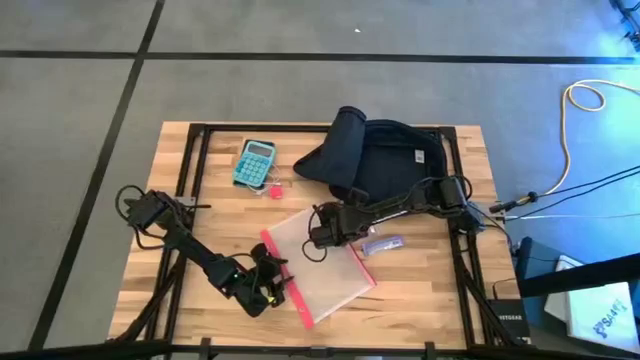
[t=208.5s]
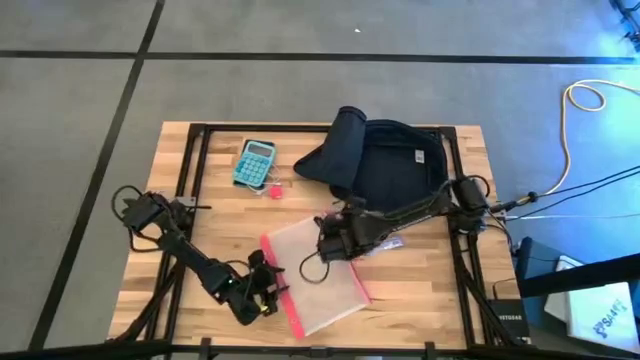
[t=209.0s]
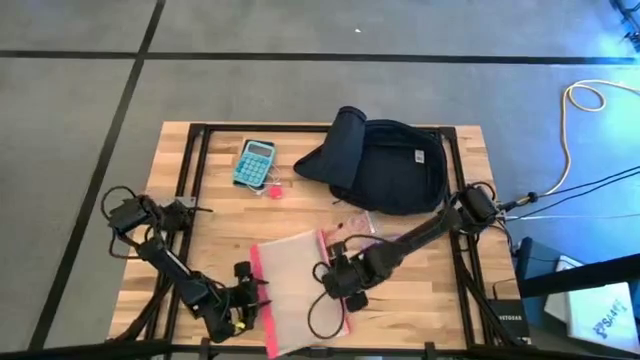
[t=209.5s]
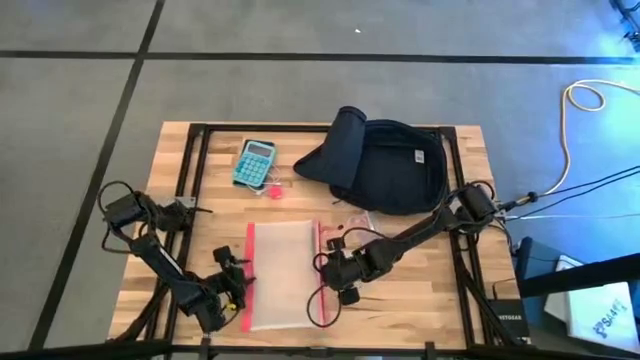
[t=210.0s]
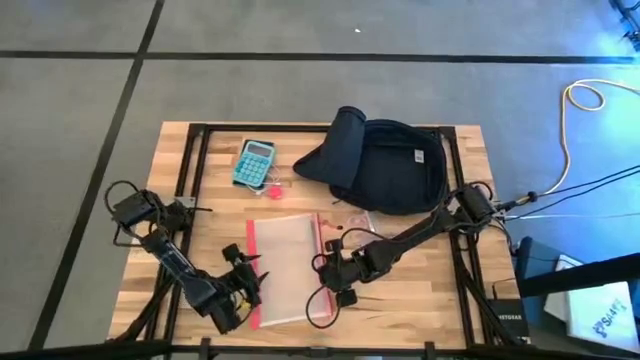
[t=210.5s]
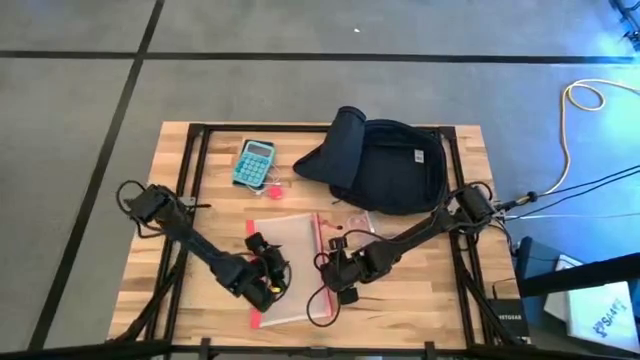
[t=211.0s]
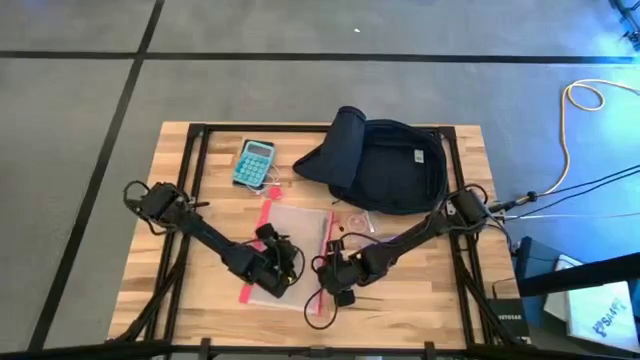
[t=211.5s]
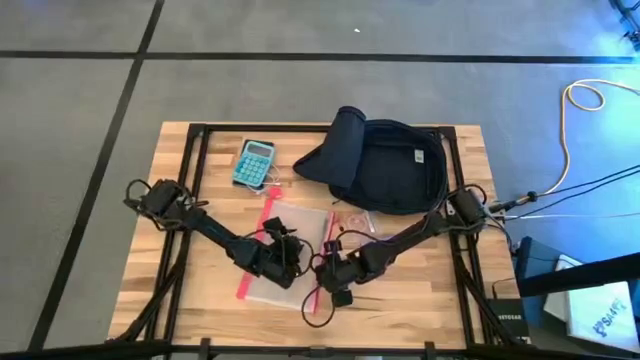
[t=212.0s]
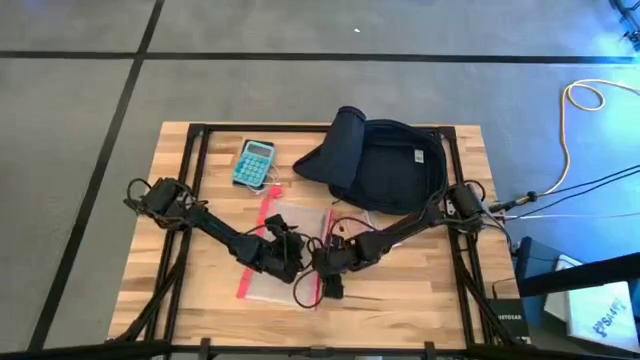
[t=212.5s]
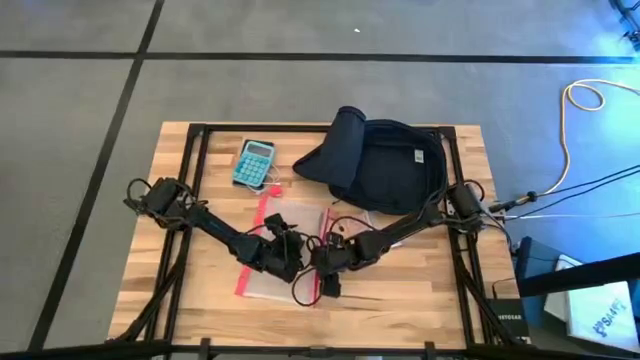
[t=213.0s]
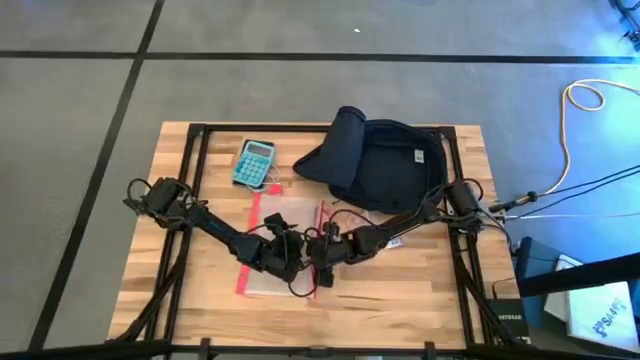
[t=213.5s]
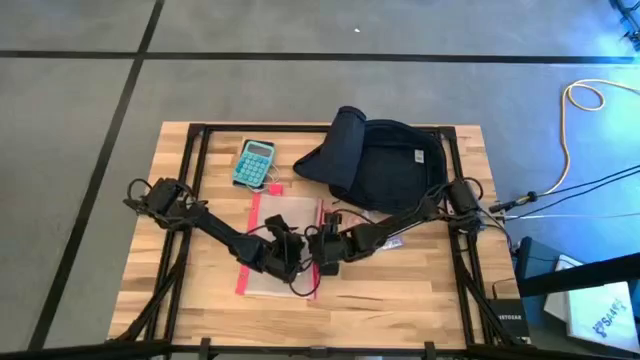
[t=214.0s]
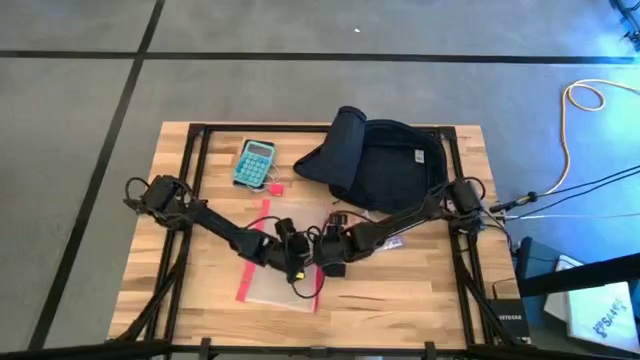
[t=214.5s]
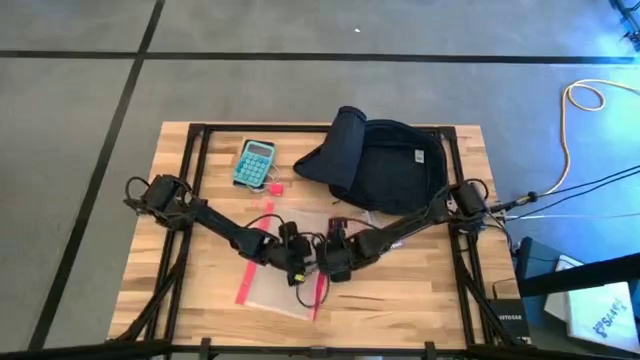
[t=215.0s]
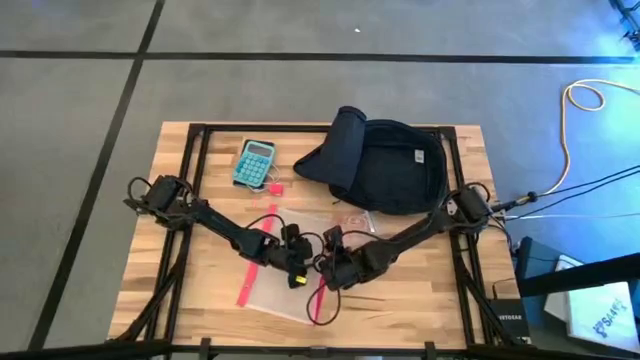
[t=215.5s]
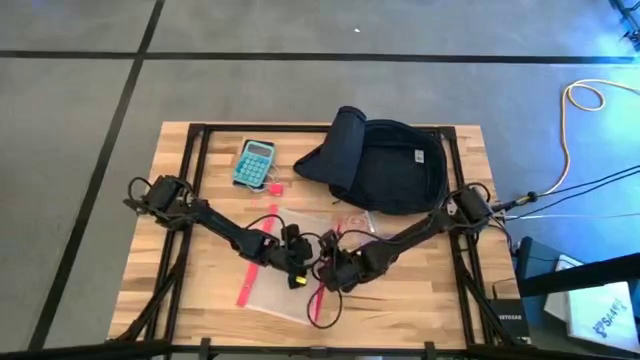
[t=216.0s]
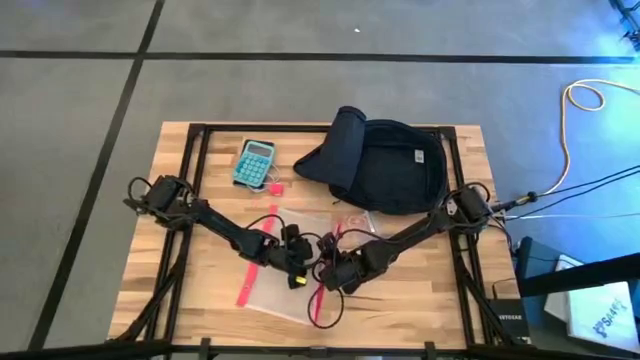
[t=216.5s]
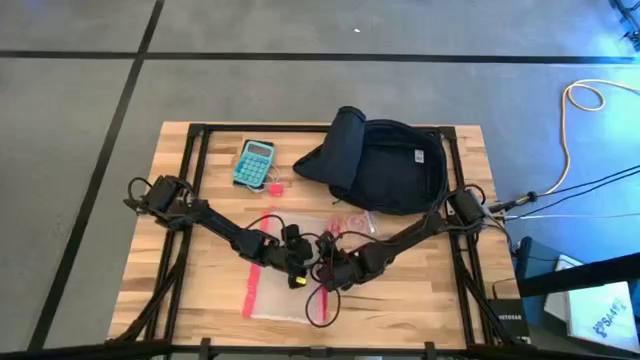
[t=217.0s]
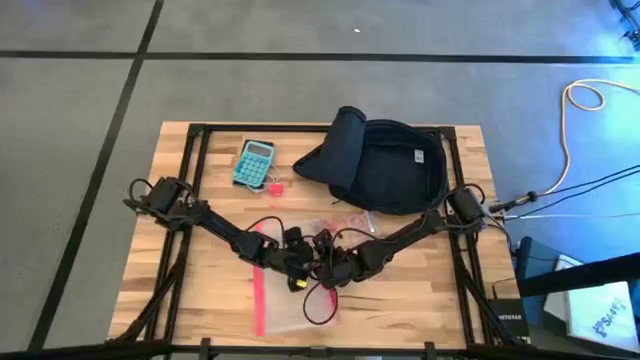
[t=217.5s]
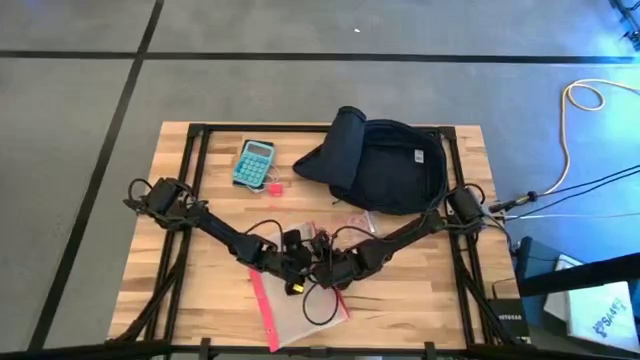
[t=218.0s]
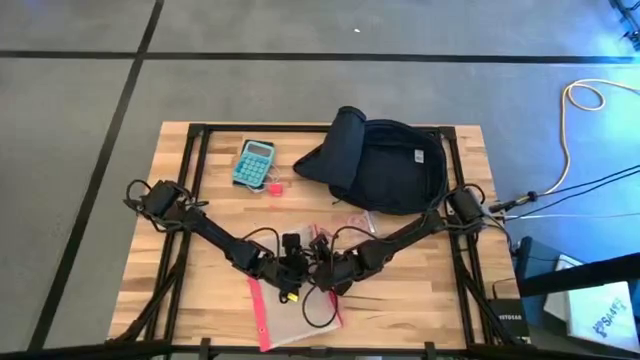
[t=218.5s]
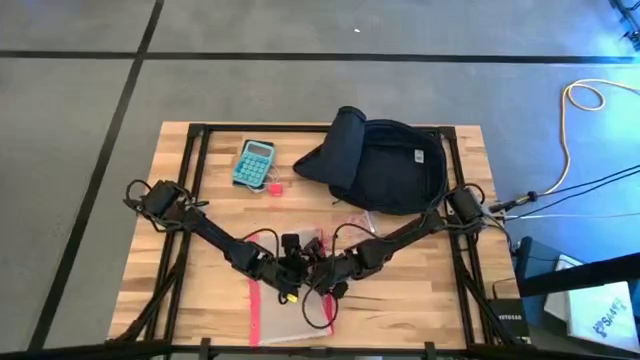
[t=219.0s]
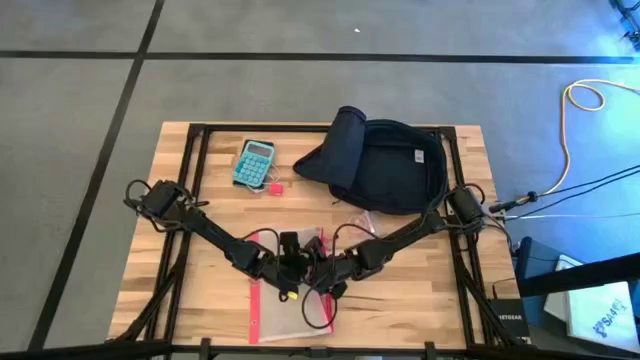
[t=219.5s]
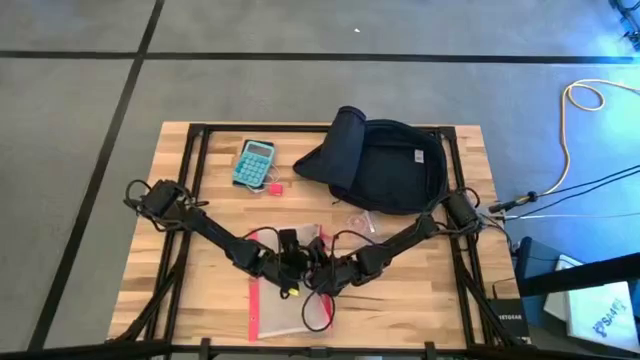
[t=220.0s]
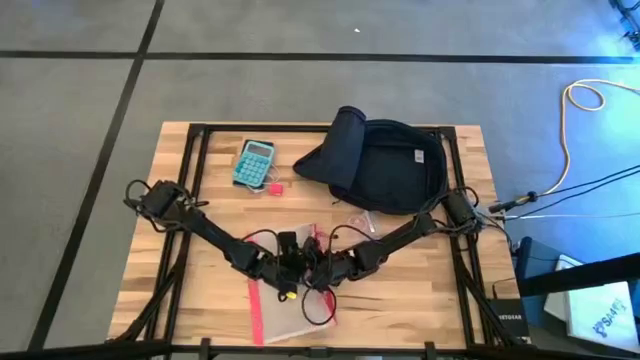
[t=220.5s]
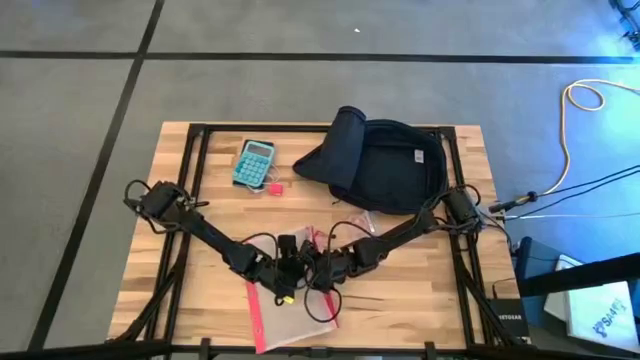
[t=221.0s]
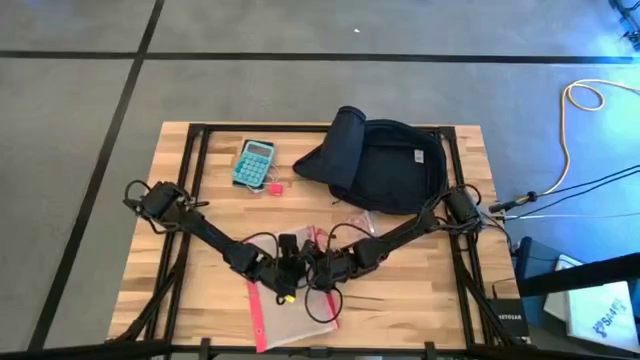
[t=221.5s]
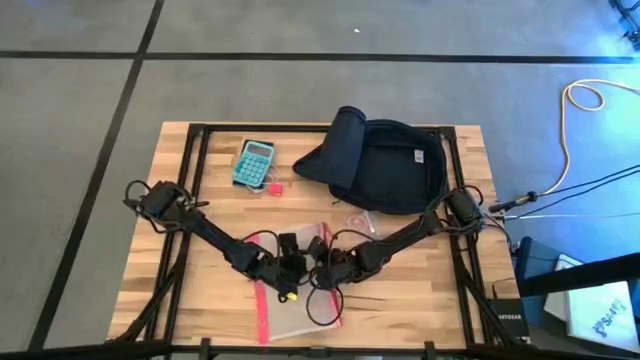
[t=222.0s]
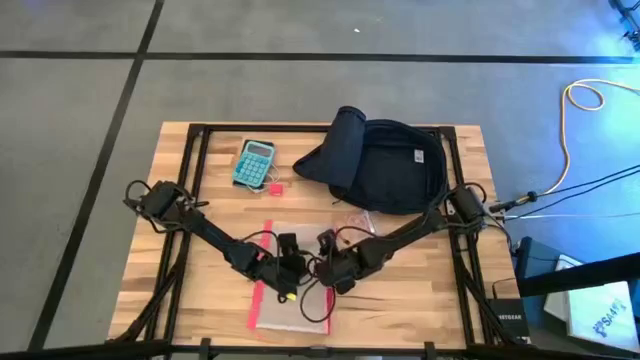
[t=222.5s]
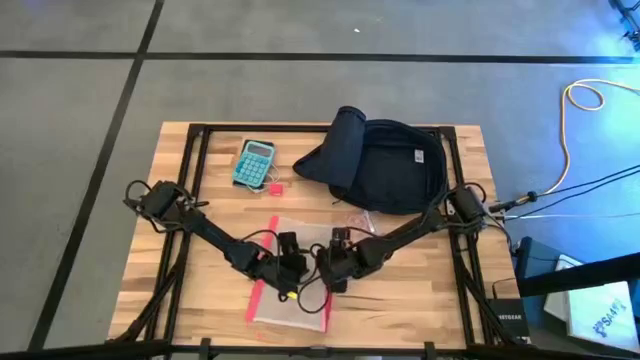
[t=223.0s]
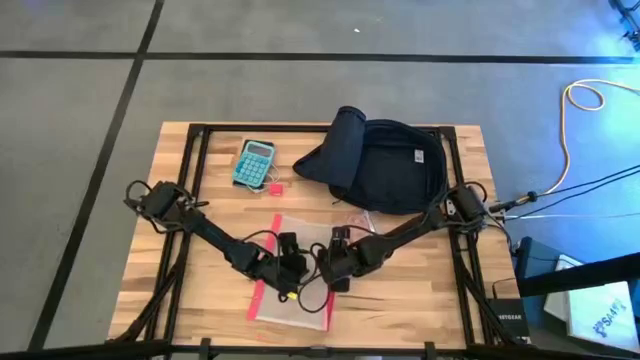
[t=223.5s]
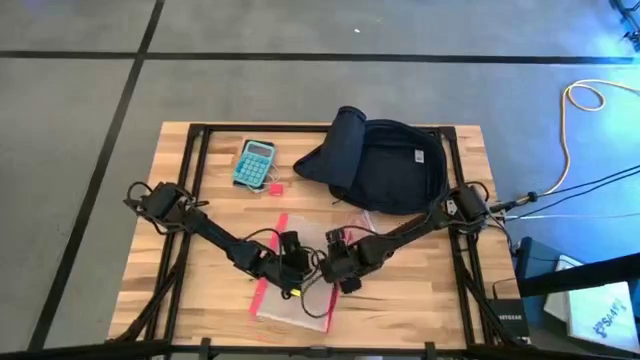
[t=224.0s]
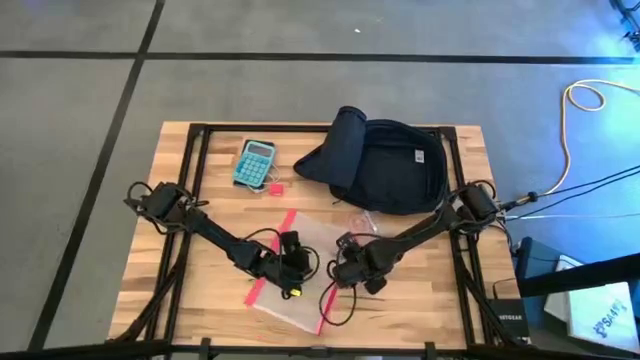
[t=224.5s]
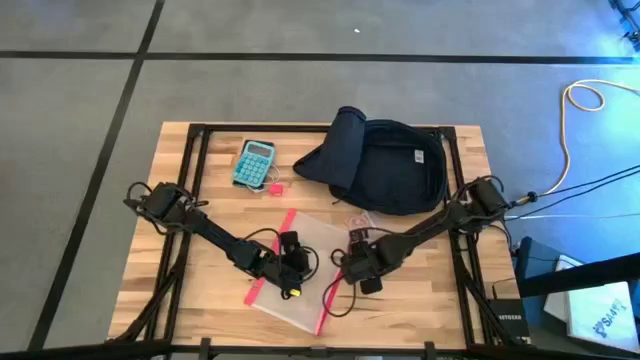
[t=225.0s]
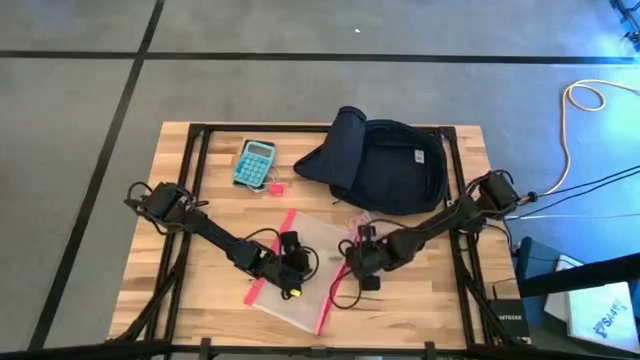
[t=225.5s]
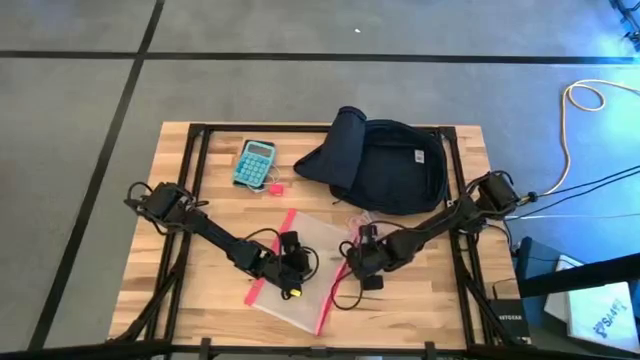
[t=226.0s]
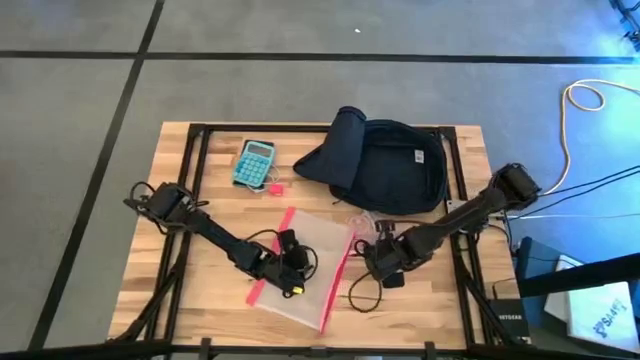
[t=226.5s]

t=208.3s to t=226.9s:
Task: Unpack backpack
Remove the black pen from the transparent zip bag

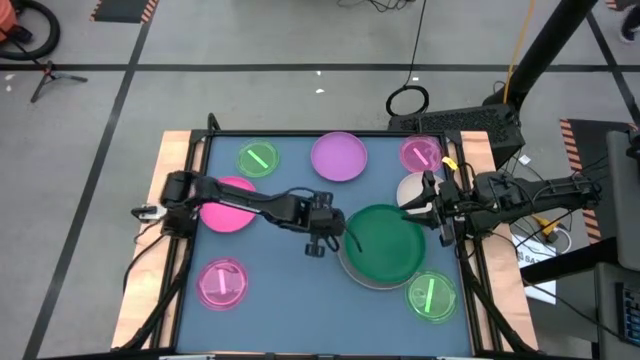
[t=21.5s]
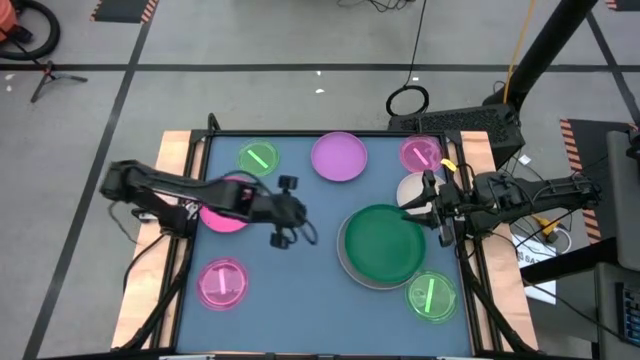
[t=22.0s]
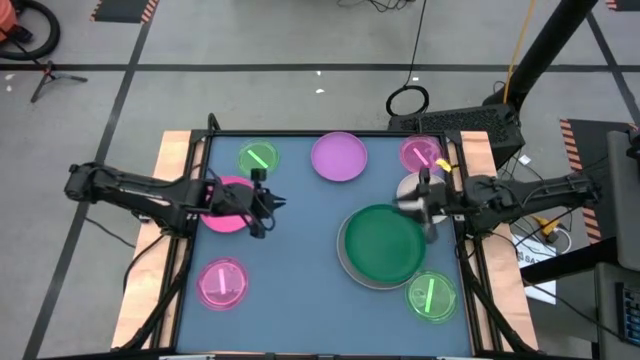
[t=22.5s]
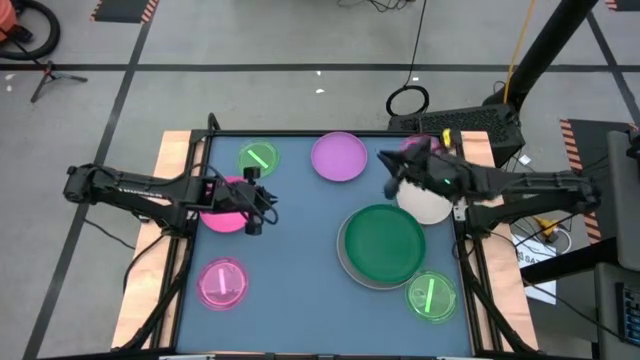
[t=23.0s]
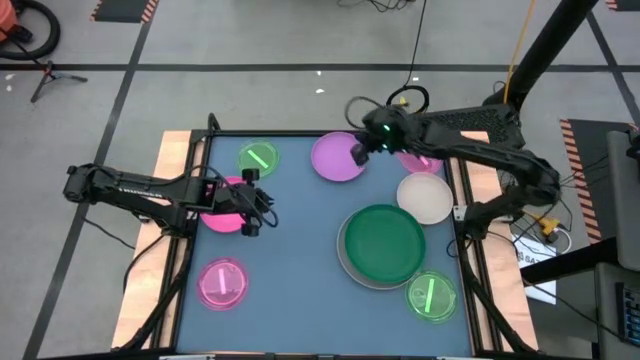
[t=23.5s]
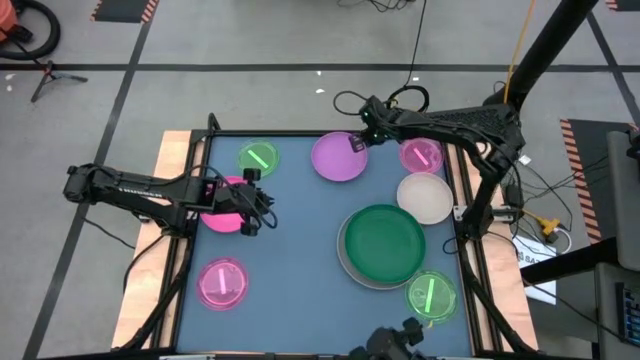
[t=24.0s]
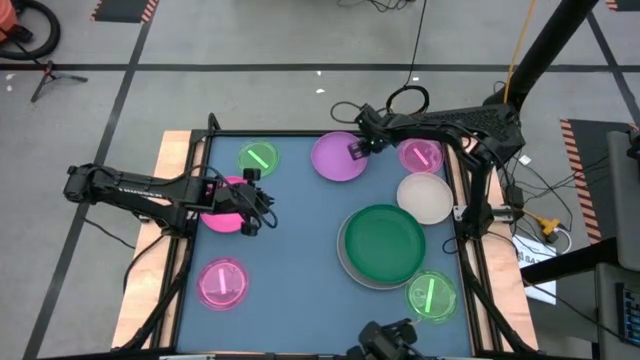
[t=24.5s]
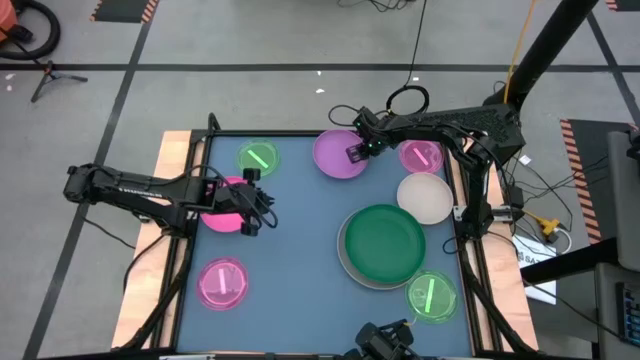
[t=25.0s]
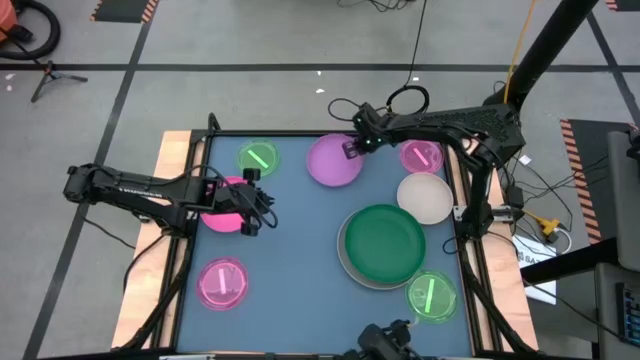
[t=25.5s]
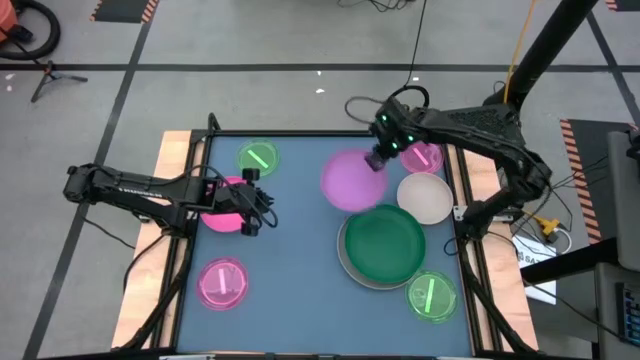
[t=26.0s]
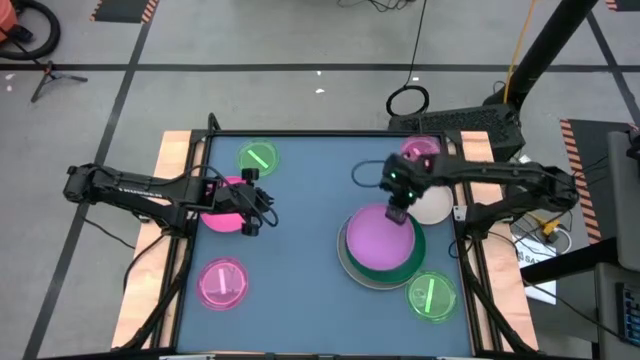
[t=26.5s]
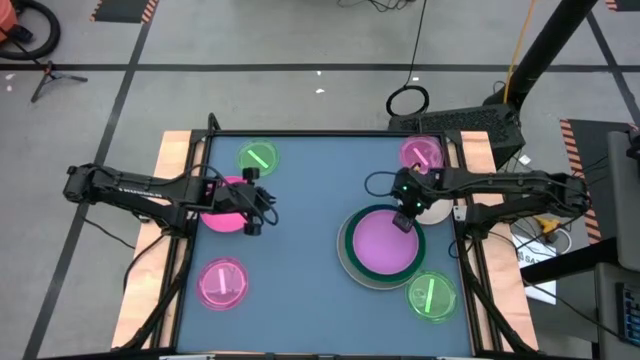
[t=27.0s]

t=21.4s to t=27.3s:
Task: Stack plastic plates
Stack the purple plate on top of the dark green plate
